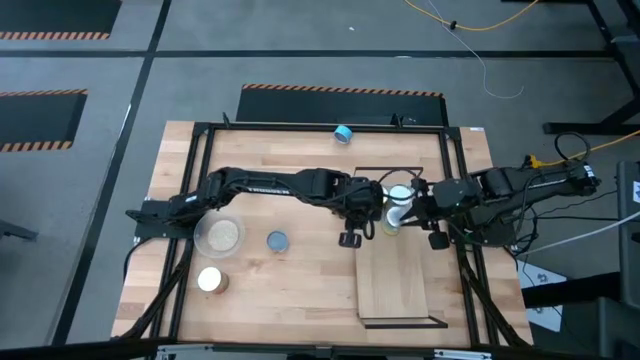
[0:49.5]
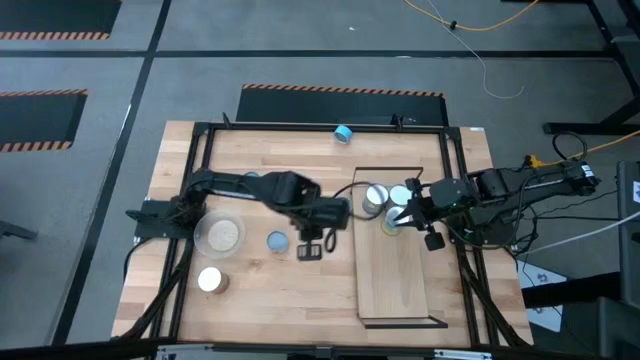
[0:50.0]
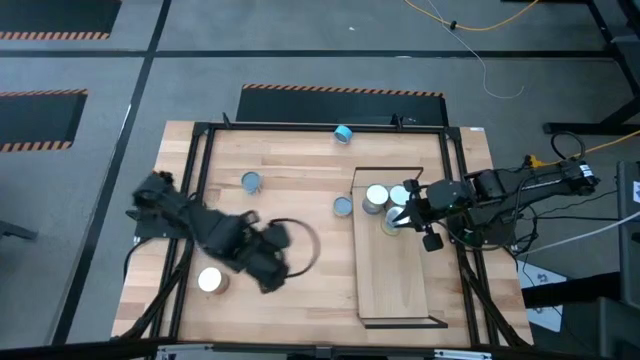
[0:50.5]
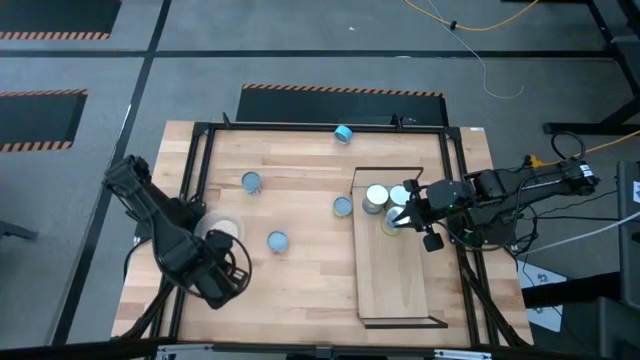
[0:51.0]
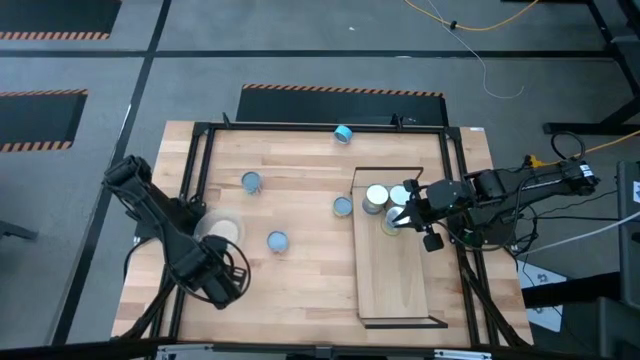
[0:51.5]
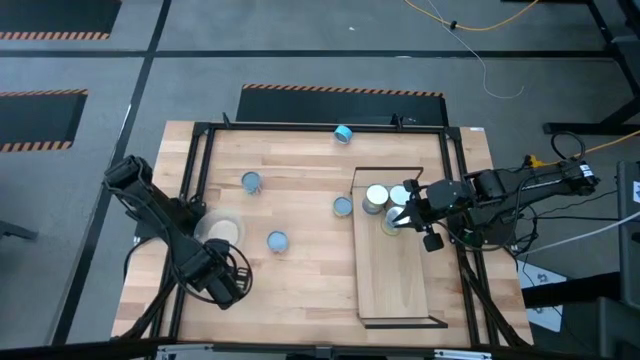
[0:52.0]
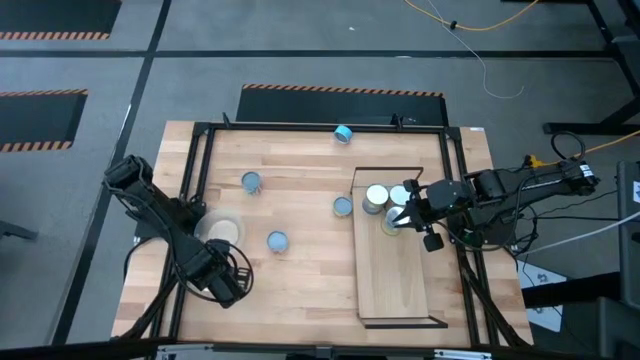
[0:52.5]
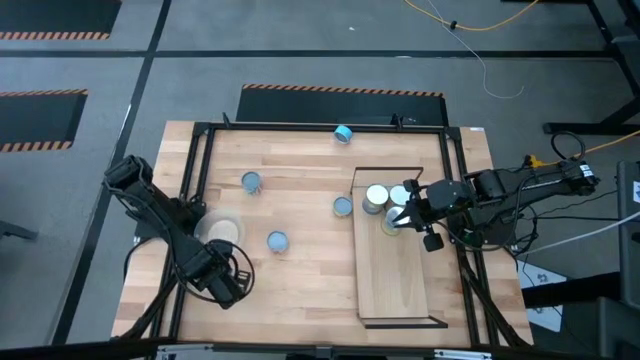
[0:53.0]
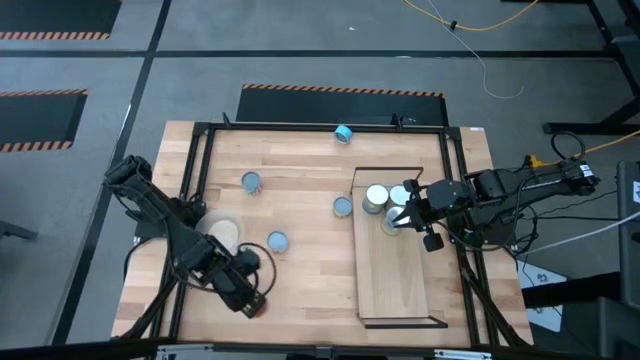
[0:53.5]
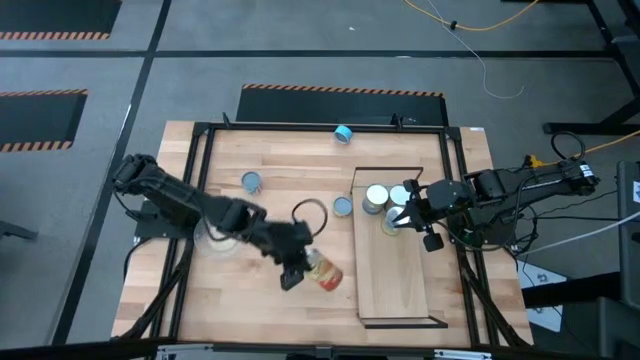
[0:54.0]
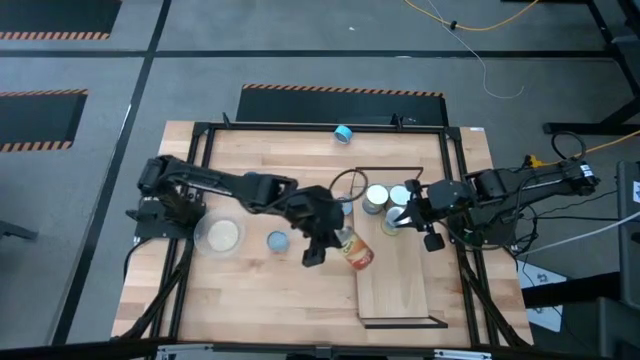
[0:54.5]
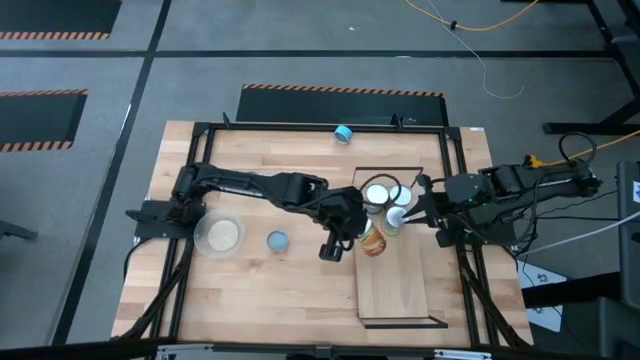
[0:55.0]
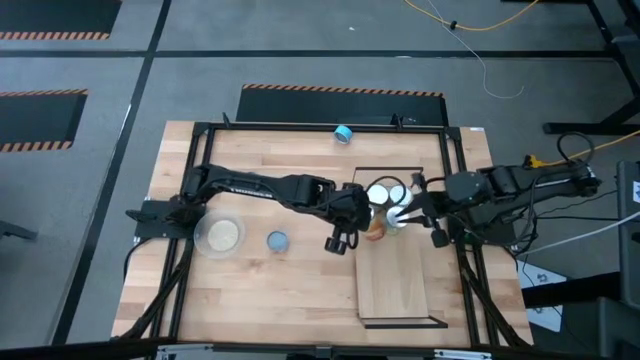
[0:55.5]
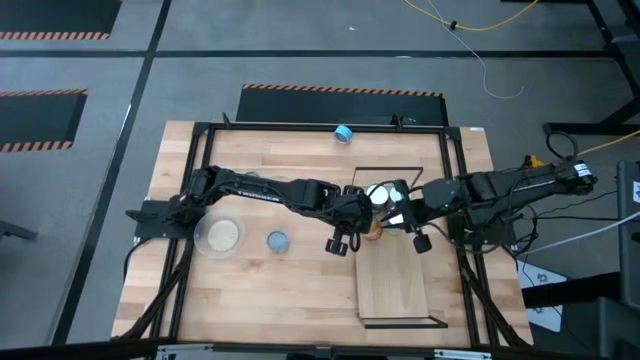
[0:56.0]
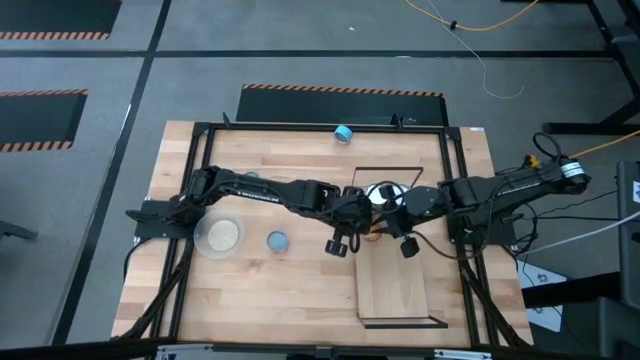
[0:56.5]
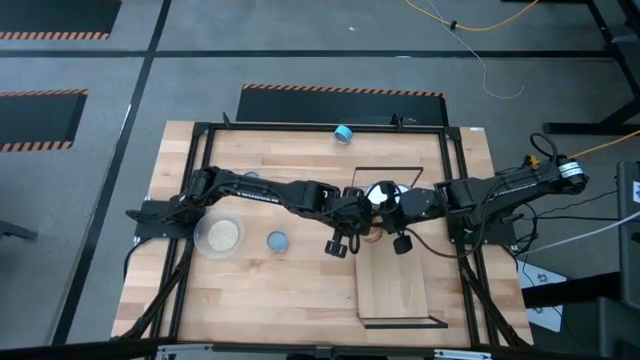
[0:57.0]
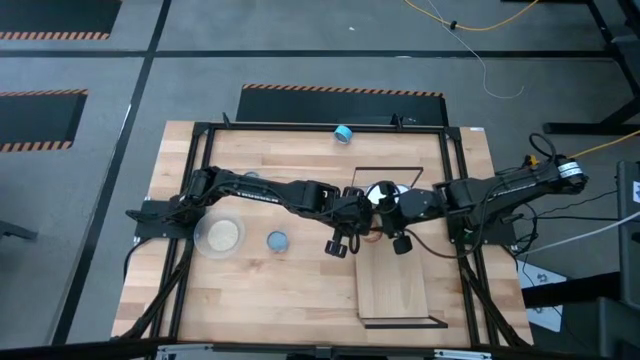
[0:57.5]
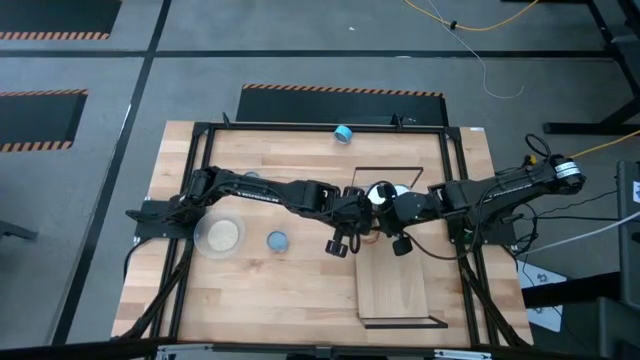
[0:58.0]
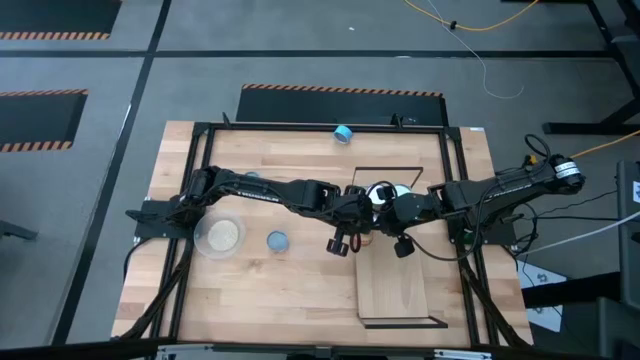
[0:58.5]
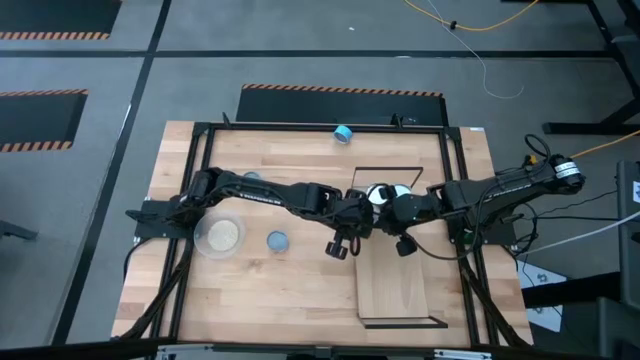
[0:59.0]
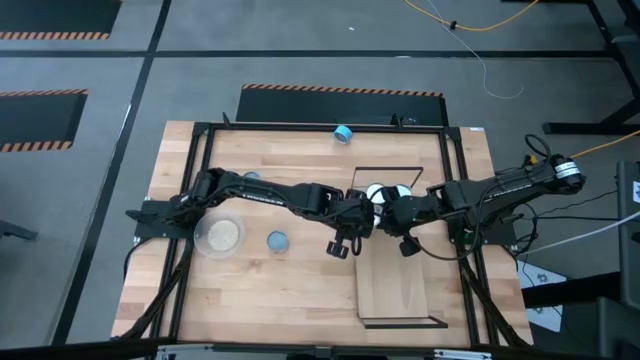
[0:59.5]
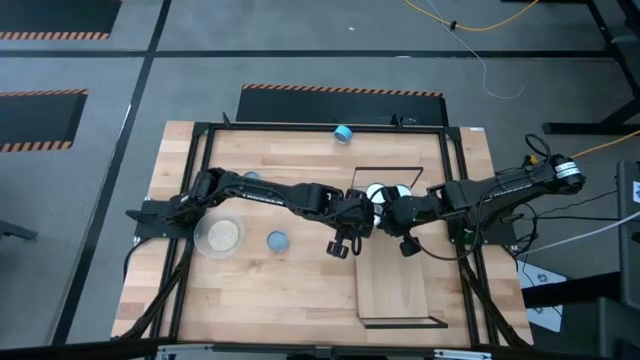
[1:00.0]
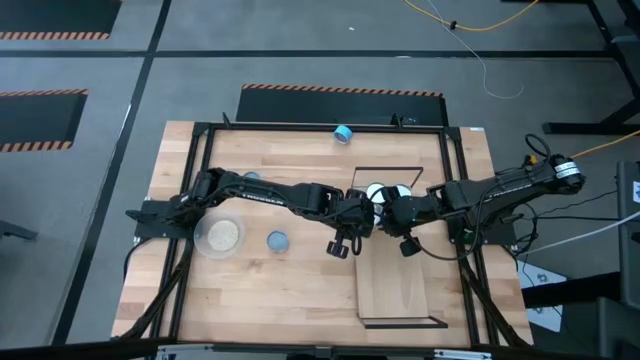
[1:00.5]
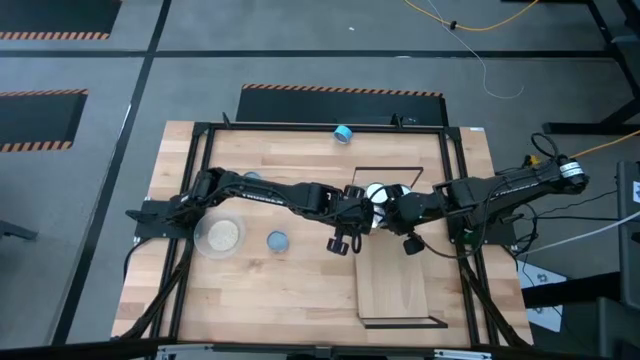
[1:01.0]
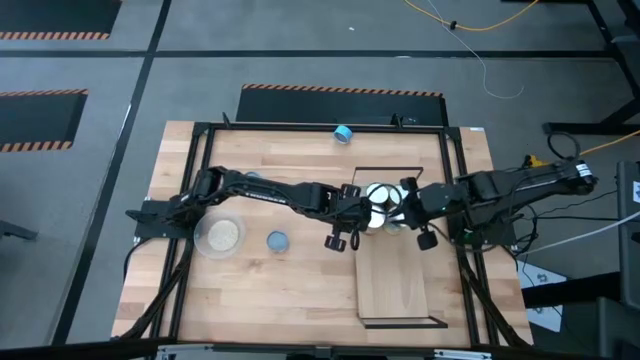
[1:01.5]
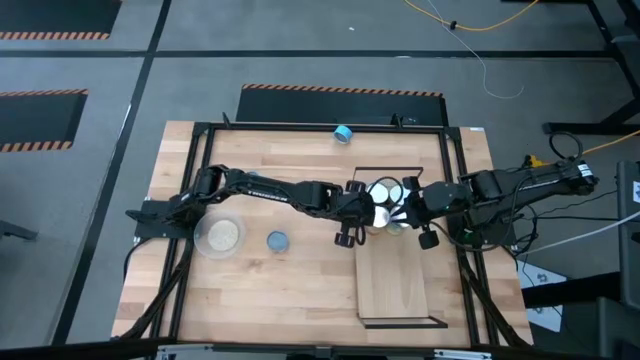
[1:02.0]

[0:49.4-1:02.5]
Task: Pick and place cans onto a shelf
Put the orange can onto the shelf aligned with the light blue can

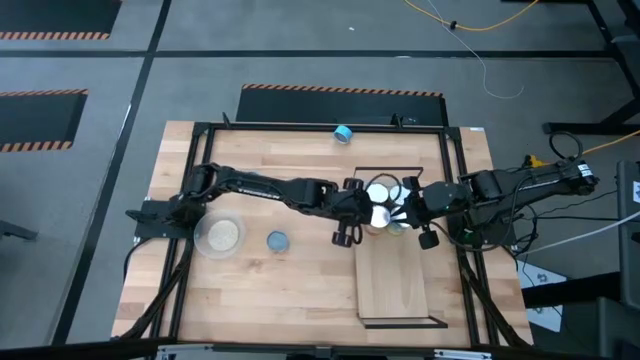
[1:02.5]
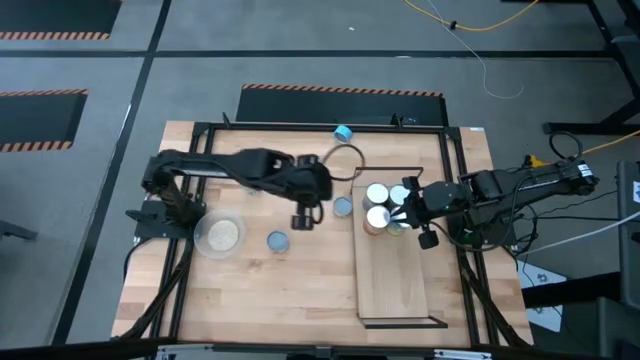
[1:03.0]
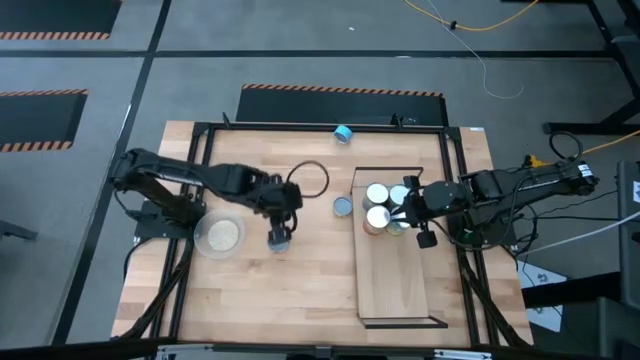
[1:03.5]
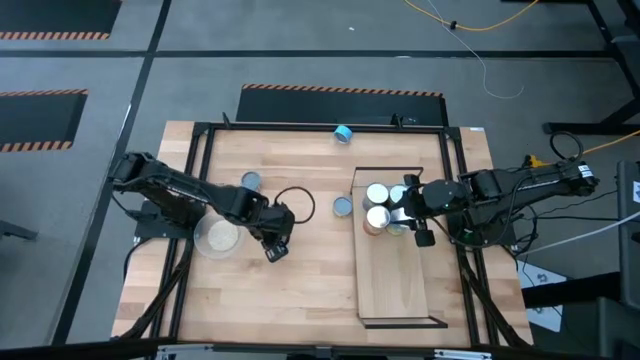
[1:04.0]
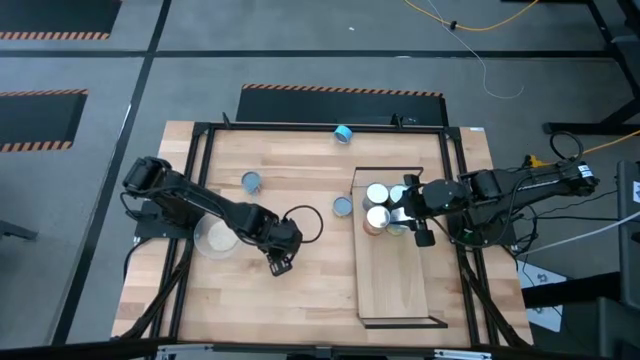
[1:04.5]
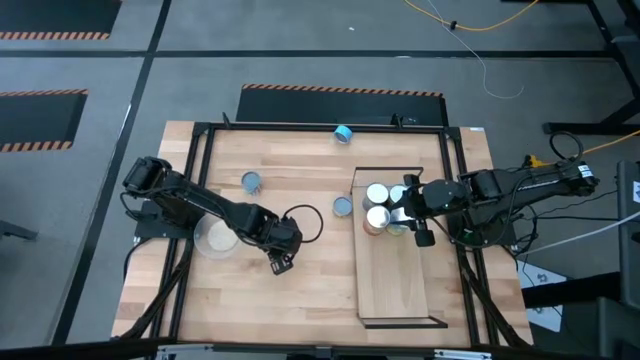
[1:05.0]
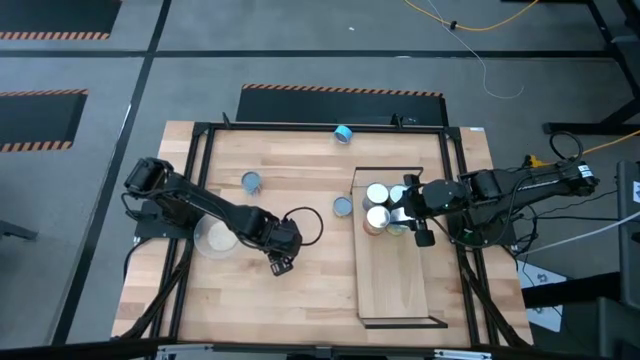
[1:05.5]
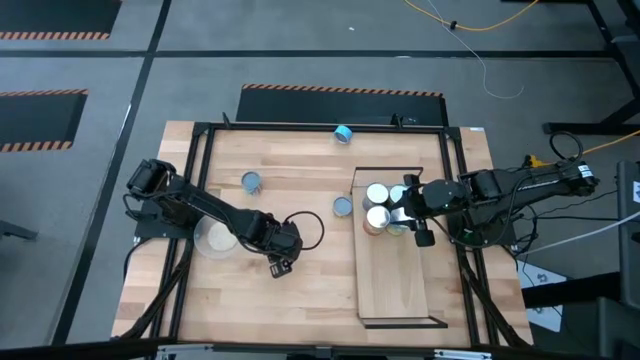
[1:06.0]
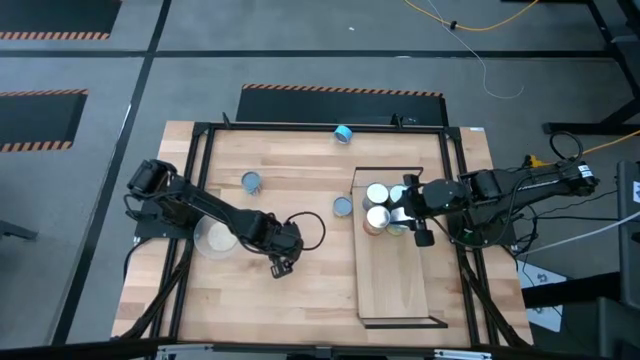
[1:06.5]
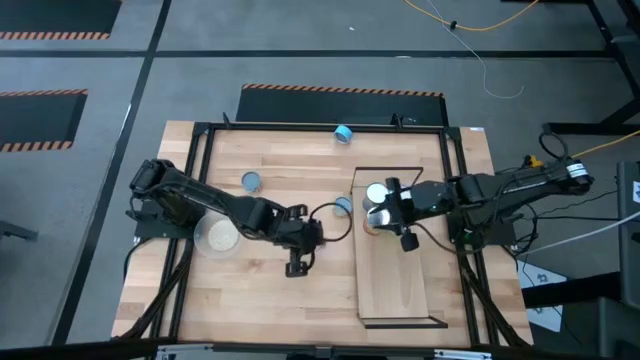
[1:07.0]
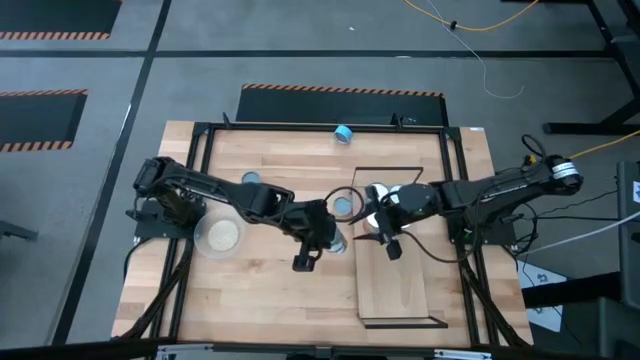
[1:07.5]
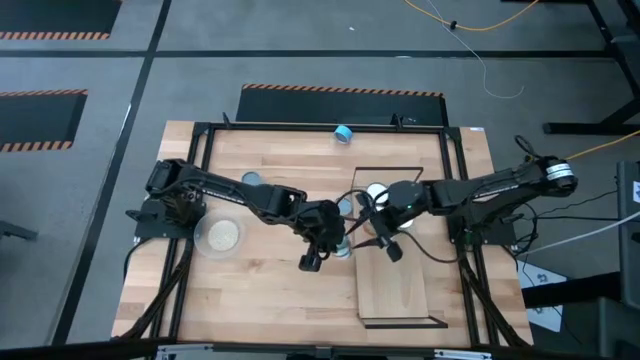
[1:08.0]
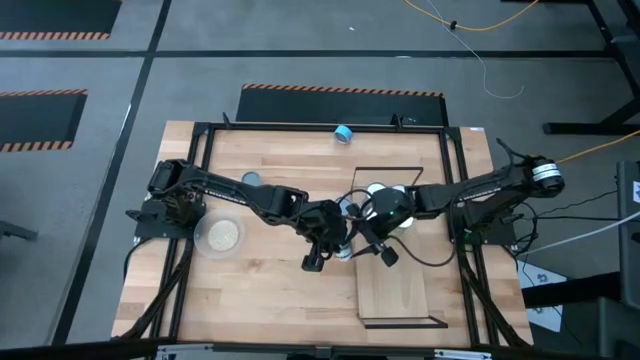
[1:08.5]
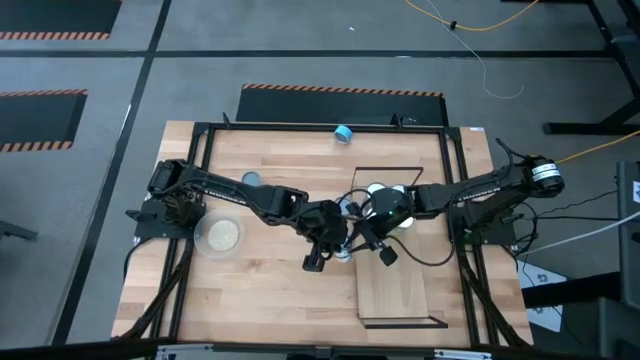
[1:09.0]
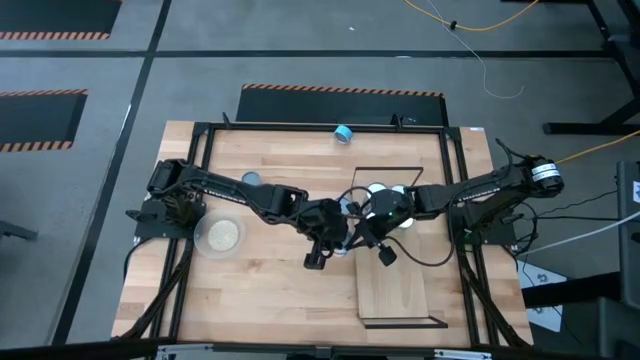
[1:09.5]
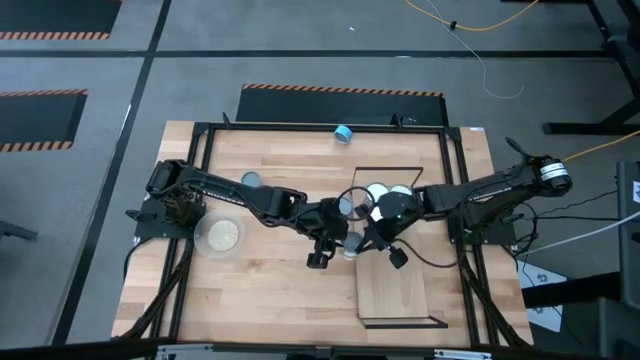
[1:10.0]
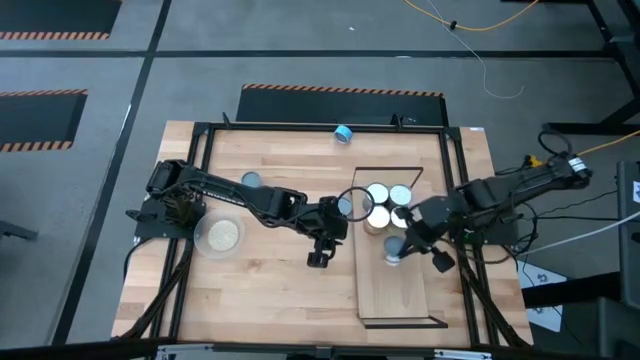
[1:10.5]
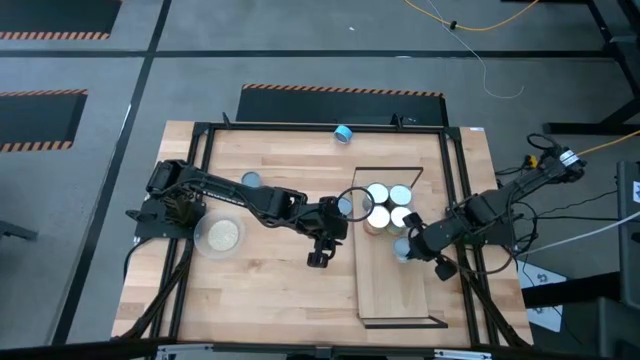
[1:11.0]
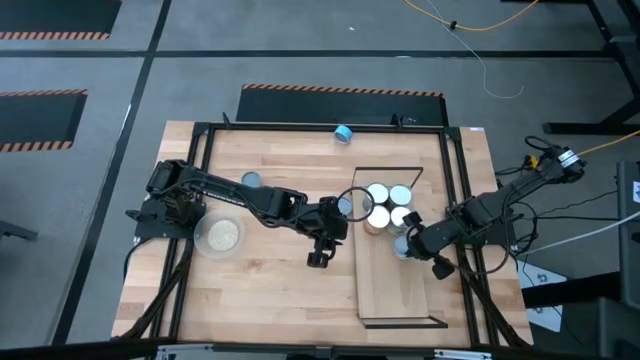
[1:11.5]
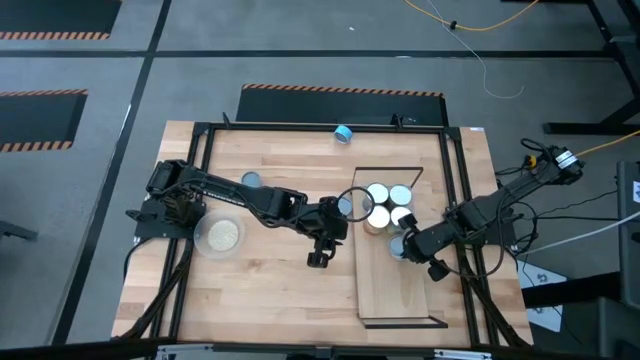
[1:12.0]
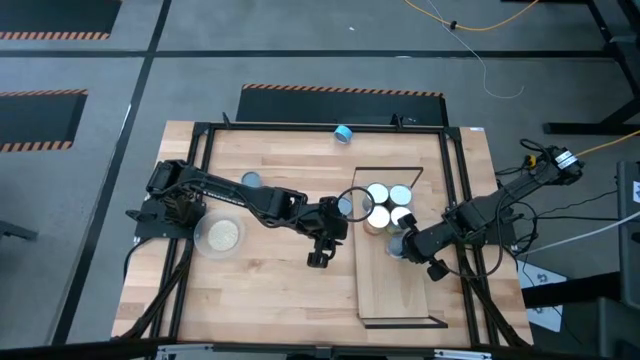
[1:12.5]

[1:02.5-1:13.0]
Put the green can onto the shelf
